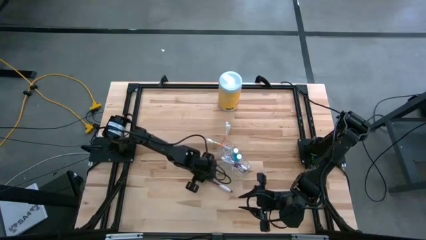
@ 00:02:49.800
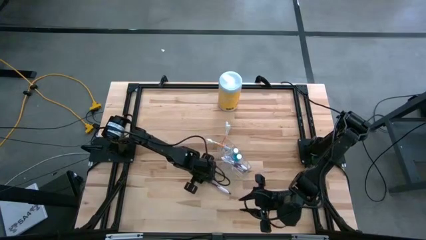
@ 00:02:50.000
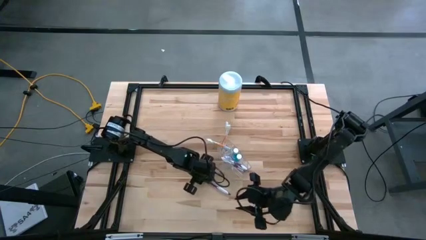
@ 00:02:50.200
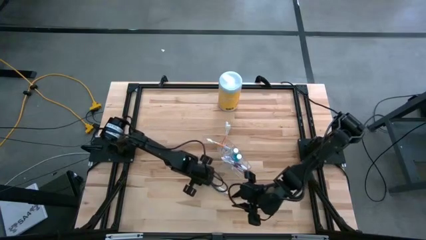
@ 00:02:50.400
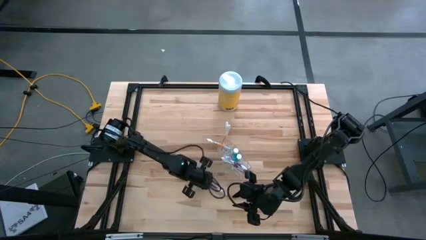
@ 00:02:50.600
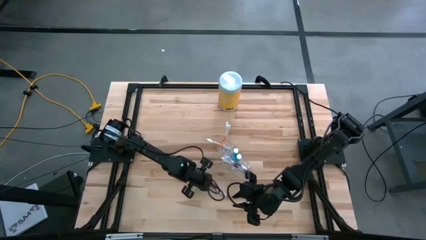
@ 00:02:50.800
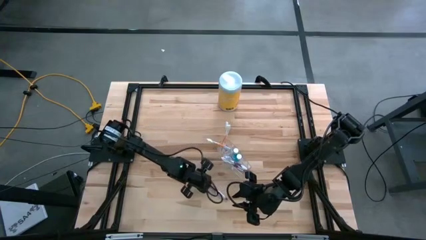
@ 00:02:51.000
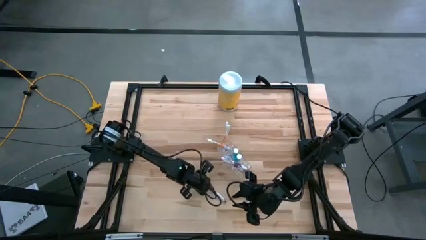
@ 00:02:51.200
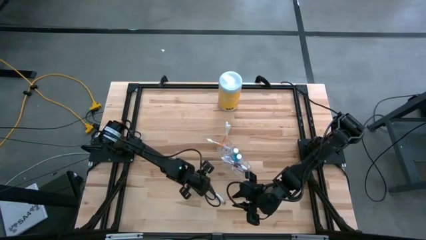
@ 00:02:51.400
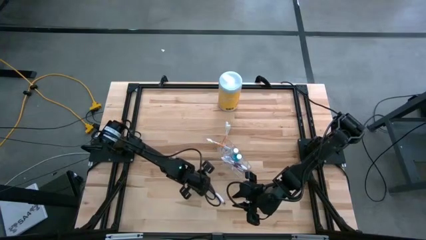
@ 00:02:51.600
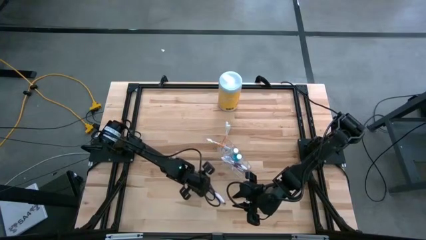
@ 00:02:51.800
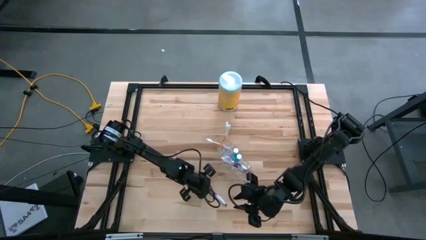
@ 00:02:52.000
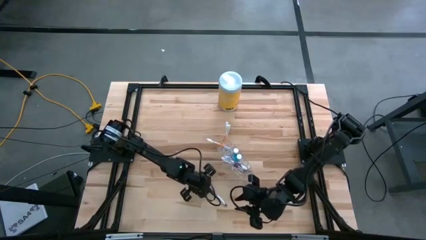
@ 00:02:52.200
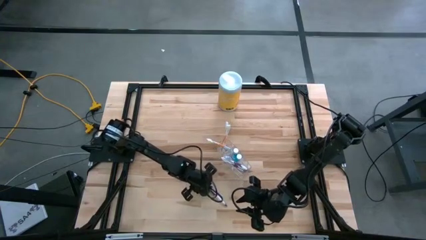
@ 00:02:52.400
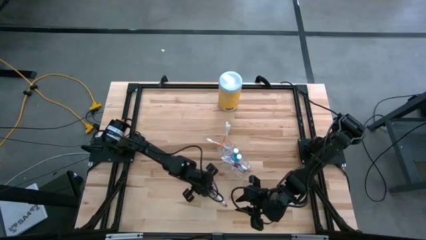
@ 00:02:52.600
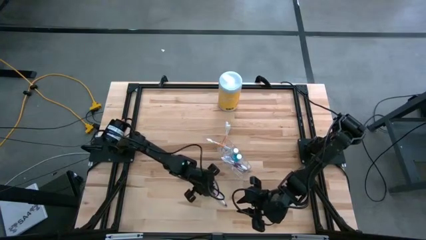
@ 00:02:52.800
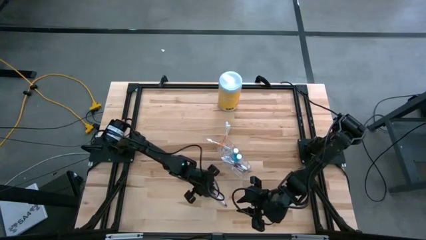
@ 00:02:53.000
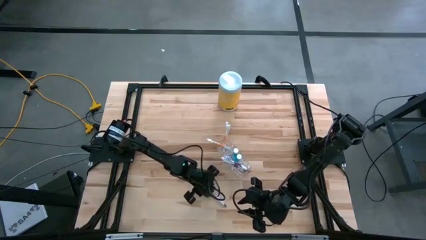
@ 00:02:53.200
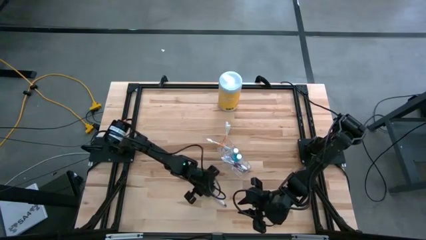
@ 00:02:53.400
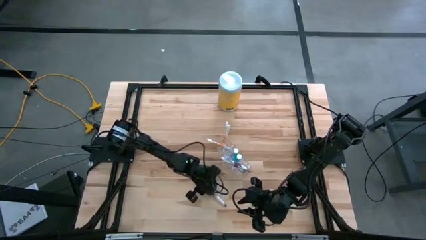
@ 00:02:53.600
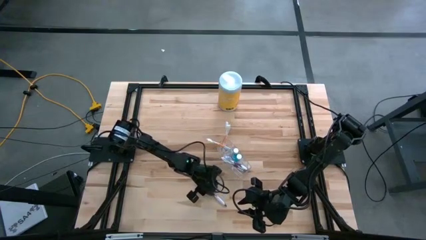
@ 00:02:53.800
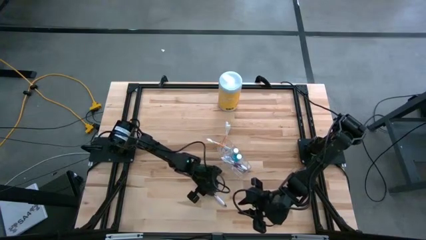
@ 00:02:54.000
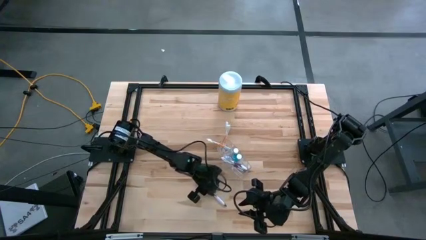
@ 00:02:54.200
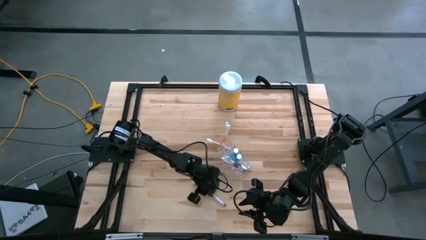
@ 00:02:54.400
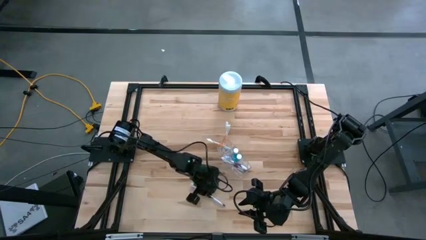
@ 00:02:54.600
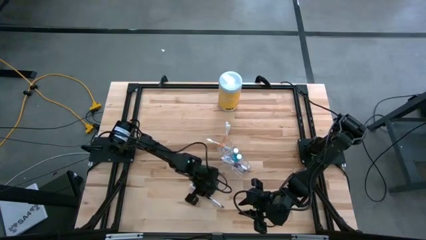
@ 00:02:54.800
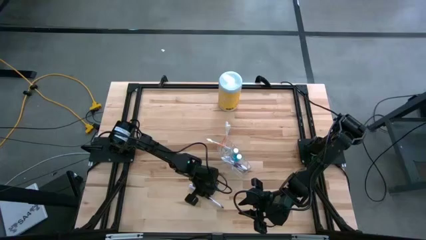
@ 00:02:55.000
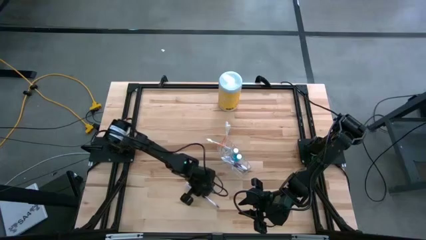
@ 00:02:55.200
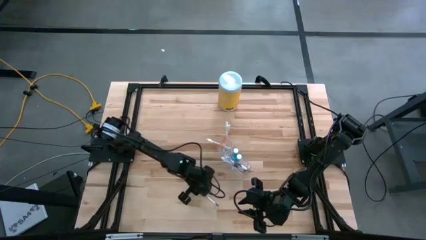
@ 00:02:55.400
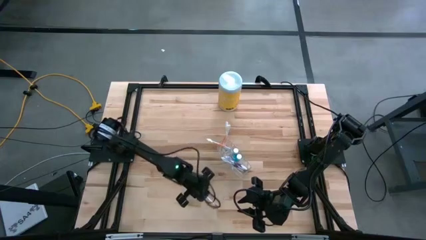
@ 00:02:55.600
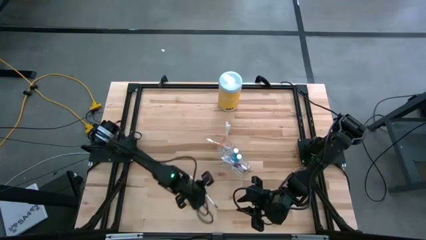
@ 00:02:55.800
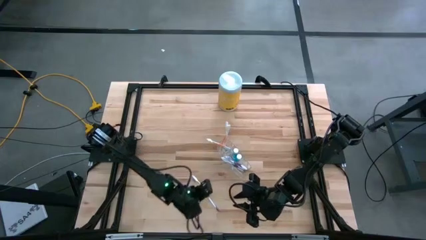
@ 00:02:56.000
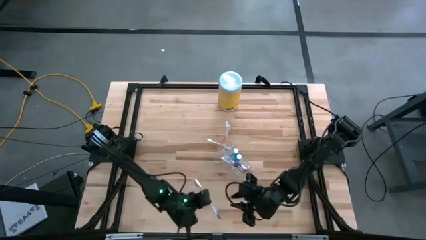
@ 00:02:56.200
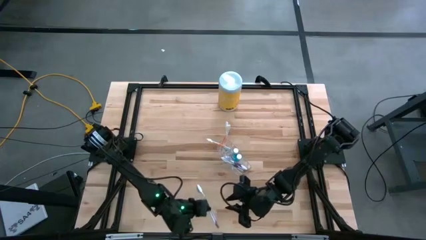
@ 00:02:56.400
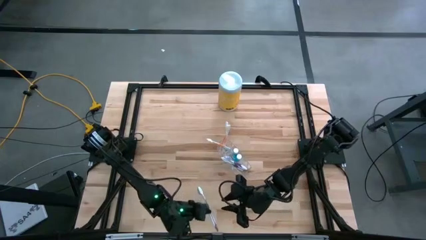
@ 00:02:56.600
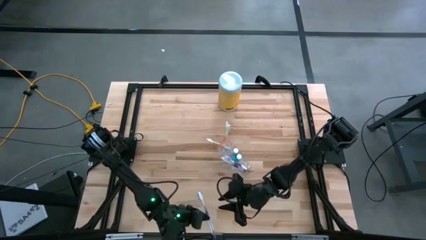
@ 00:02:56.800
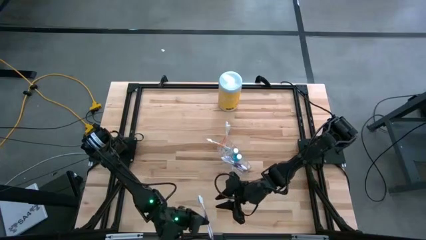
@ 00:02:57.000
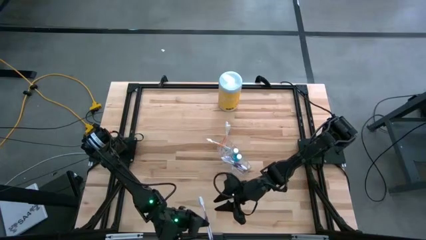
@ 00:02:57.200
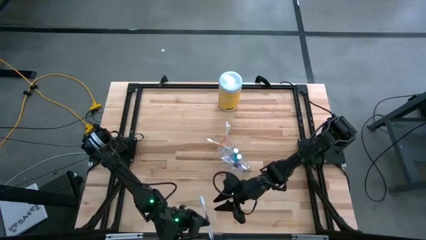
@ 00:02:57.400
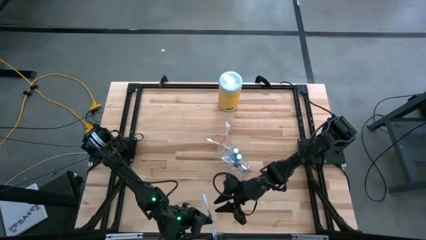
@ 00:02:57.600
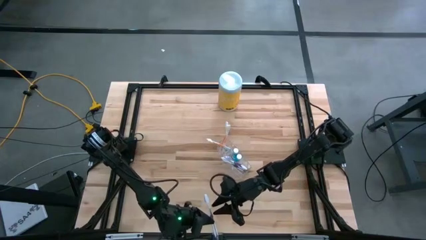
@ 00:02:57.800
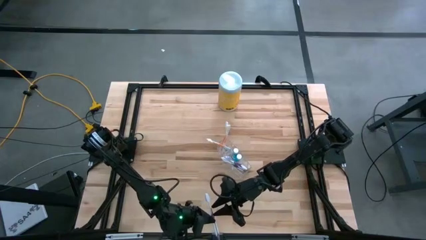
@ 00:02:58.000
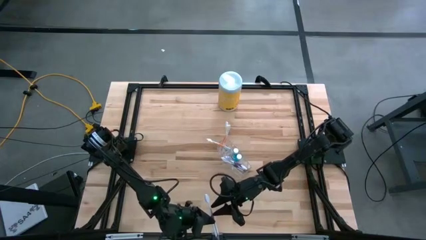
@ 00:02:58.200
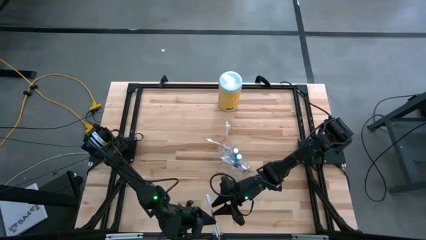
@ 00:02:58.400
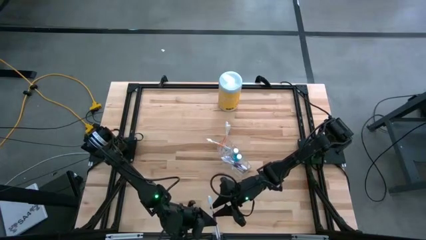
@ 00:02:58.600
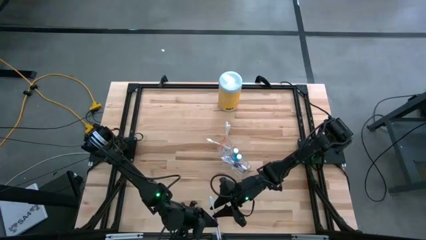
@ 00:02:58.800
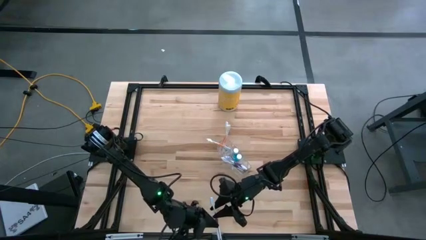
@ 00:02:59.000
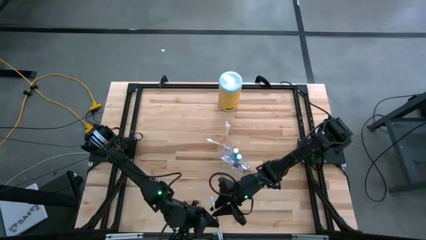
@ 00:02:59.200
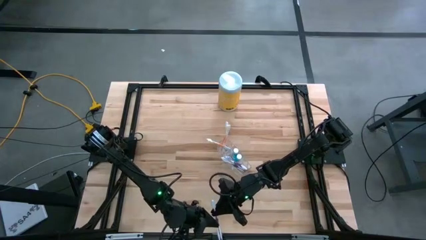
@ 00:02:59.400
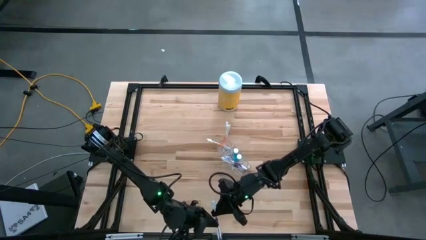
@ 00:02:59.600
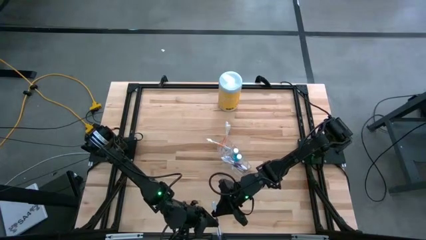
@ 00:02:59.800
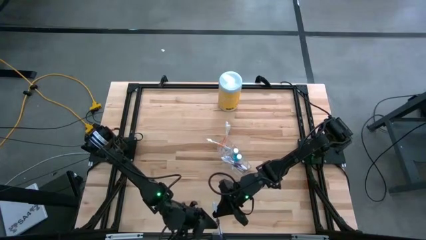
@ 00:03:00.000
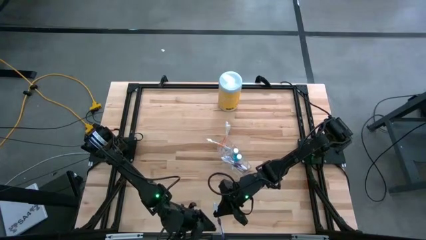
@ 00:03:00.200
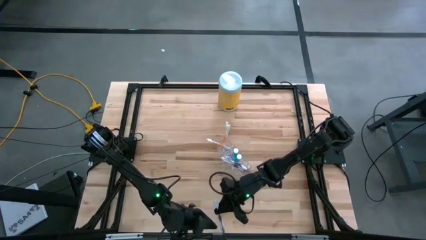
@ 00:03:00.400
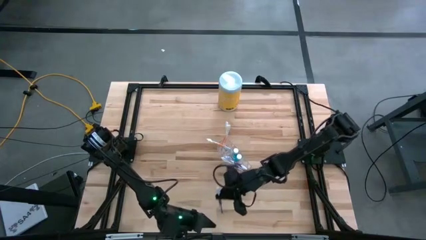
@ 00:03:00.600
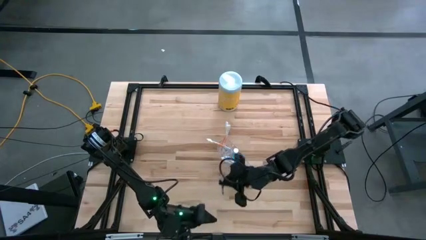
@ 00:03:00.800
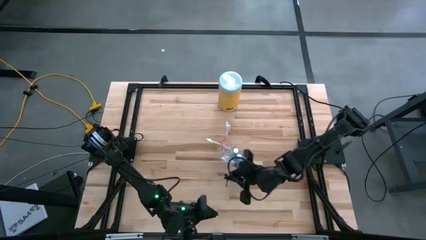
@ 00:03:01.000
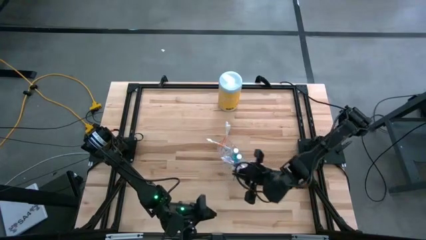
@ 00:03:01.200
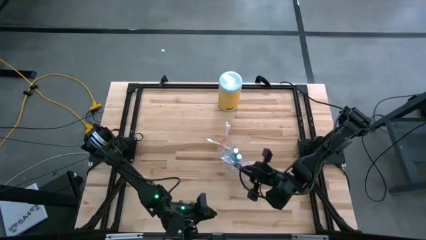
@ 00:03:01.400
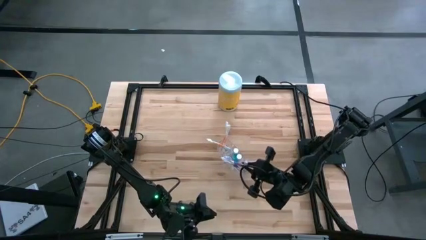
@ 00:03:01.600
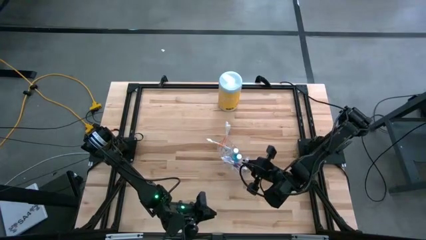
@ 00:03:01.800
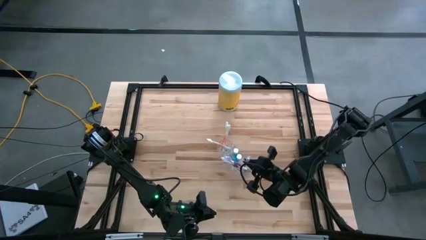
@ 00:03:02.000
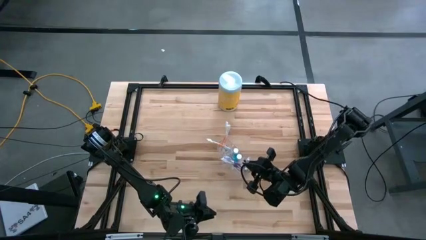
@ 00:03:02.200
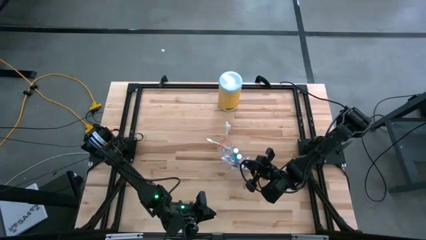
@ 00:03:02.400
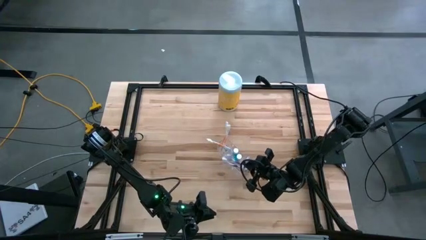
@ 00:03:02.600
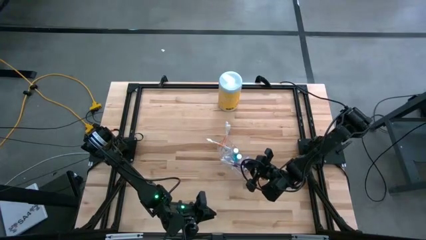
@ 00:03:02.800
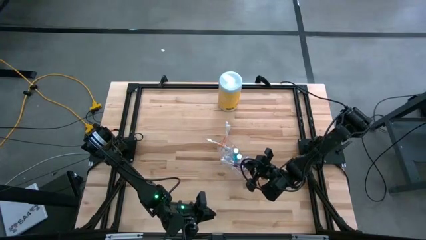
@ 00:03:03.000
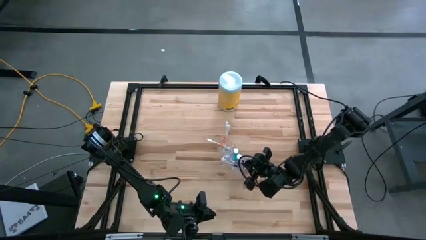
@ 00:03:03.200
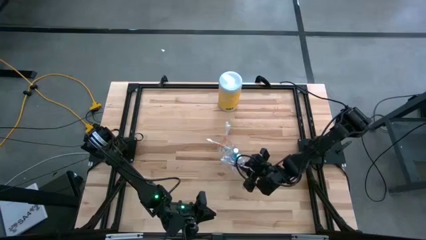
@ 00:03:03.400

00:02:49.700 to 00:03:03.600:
Task: Pick & Place toothbrushing station
Put the purple toothbrush into the bottom compartment of the transparent organizer
